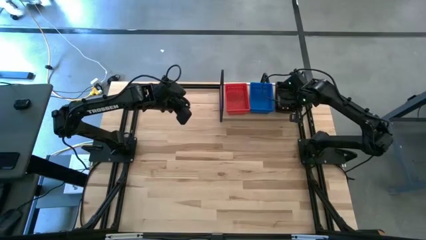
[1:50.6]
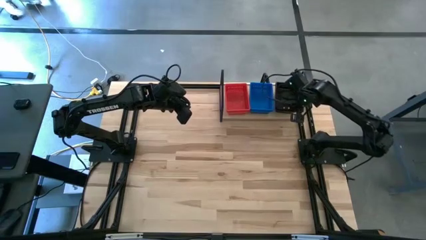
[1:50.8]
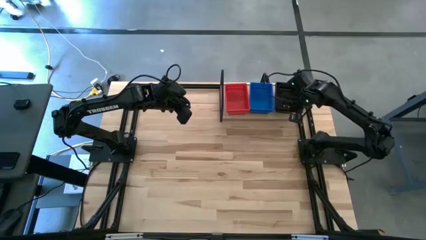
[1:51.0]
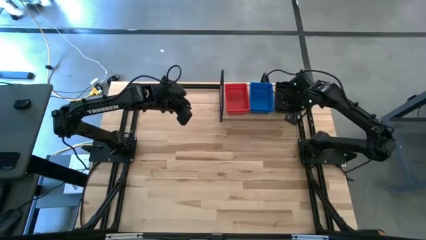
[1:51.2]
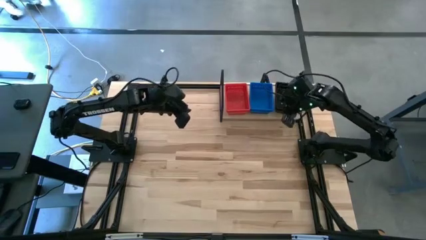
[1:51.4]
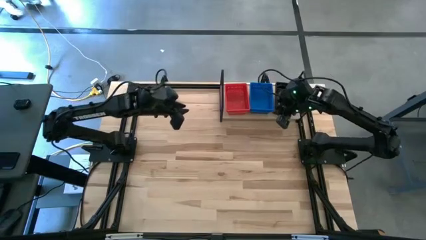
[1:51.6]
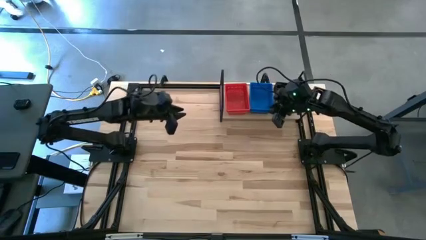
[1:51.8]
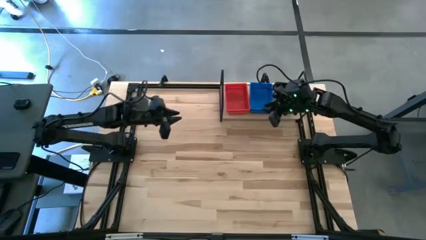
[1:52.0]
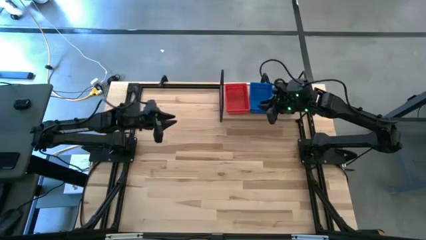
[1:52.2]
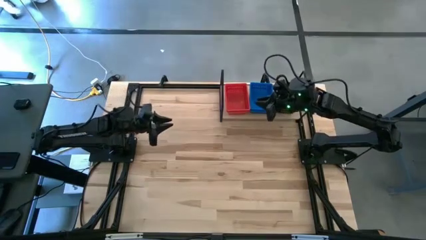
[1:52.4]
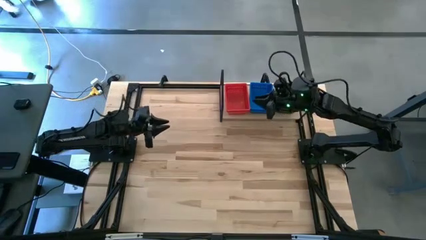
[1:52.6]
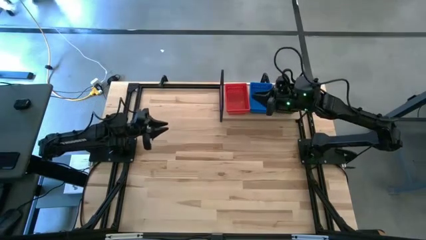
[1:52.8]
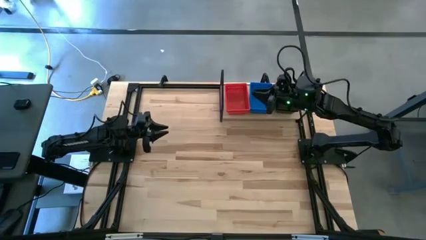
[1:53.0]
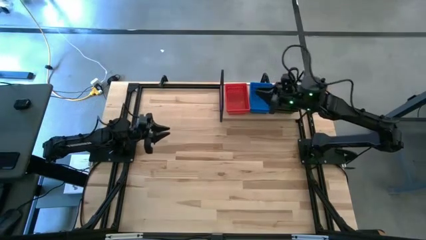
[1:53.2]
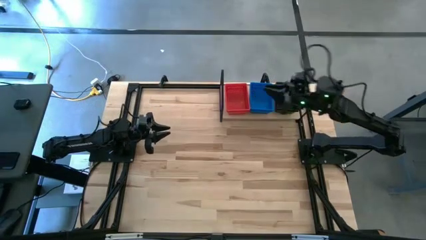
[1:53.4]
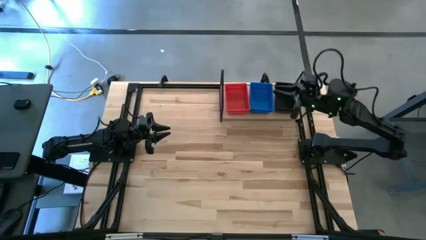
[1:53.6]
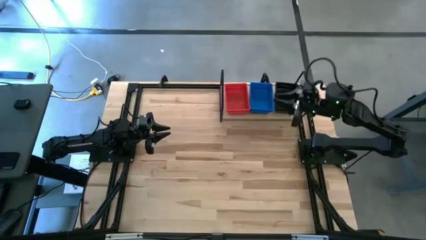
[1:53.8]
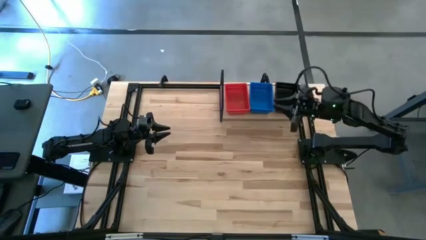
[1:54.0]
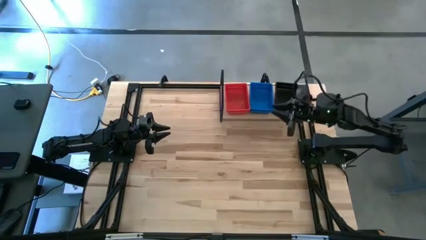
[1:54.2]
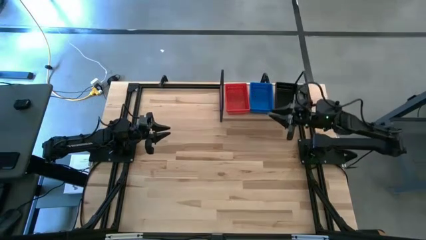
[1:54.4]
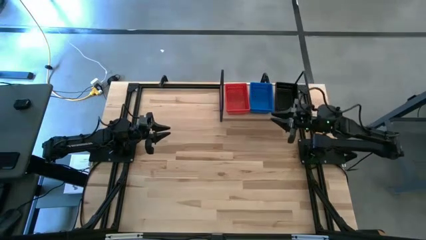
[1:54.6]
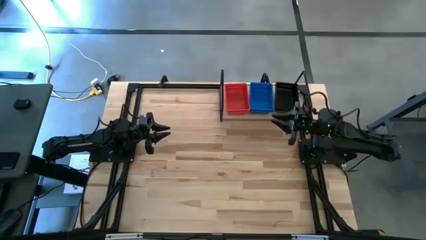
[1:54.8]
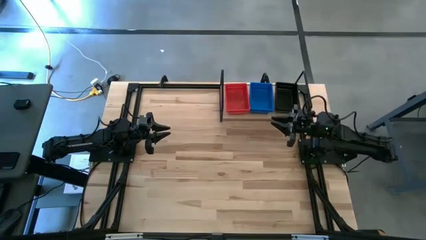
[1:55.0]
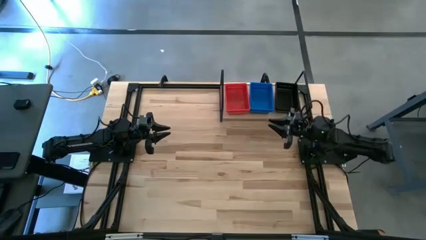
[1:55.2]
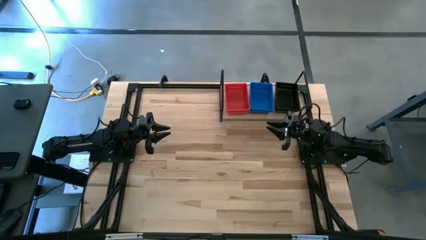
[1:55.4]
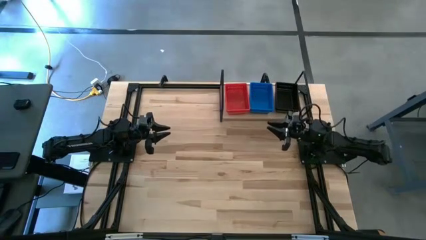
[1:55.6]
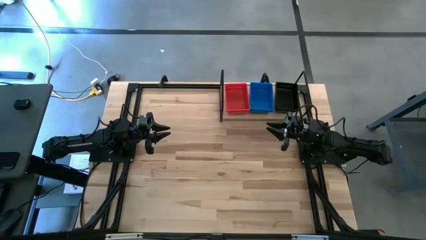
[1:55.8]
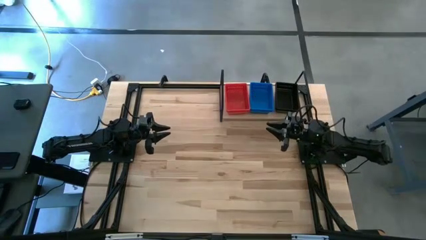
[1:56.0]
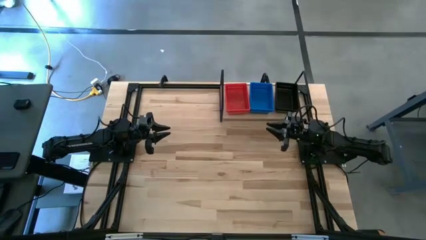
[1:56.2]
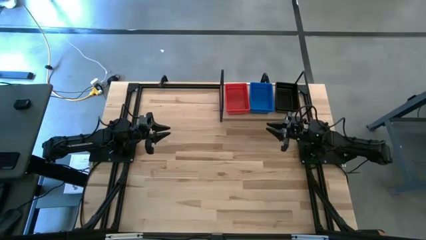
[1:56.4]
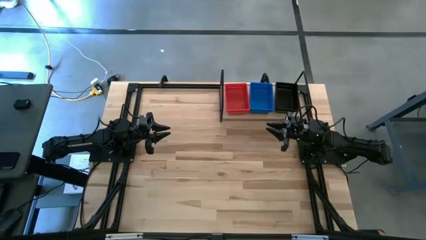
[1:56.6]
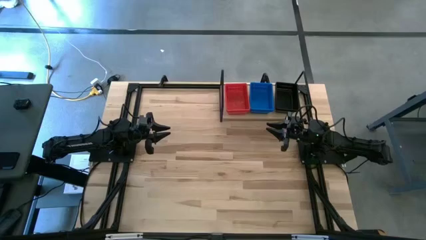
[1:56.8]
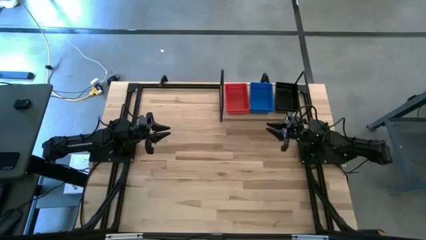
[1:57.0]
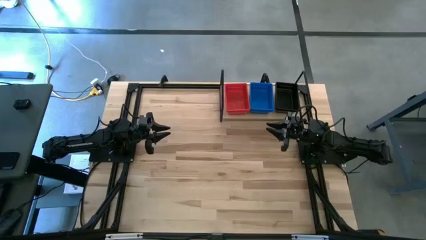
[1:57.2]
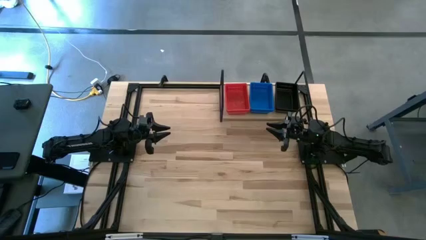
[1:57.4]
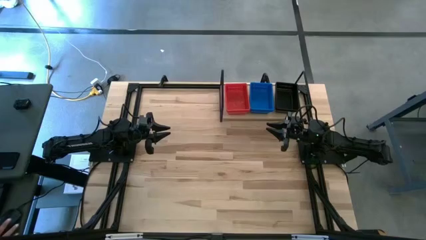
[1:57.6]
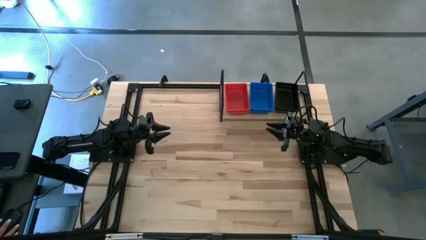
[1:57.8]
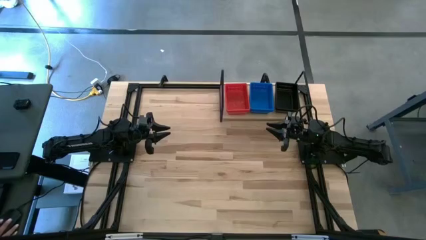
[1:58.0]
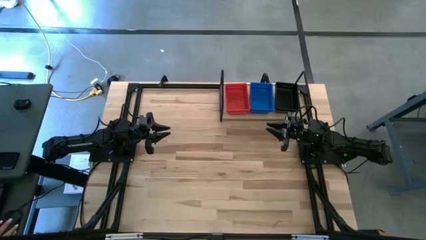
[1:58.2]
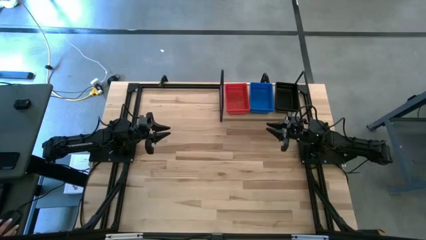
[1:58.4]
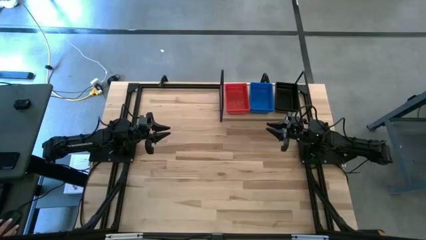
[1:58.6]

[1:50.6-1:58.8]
Task: Stack baskets on shelf by color
Return to home position

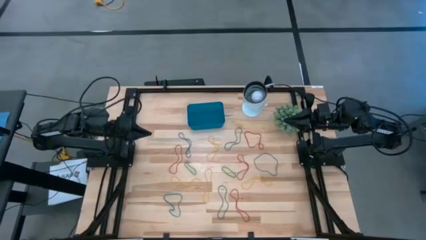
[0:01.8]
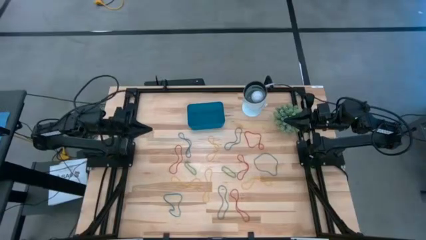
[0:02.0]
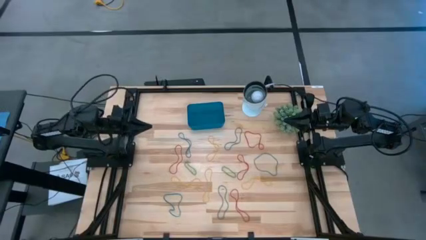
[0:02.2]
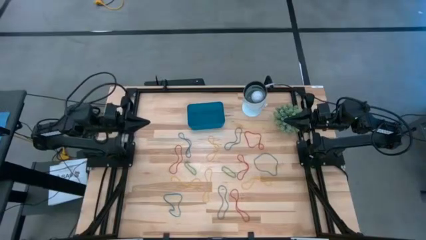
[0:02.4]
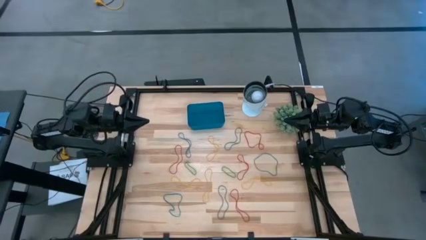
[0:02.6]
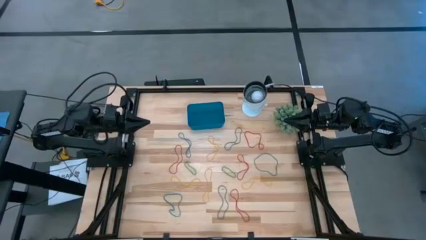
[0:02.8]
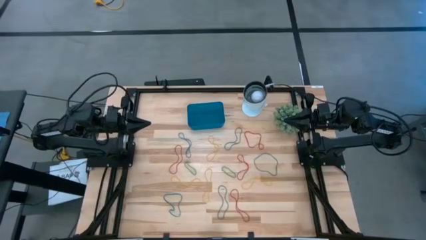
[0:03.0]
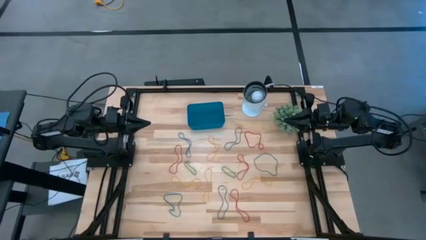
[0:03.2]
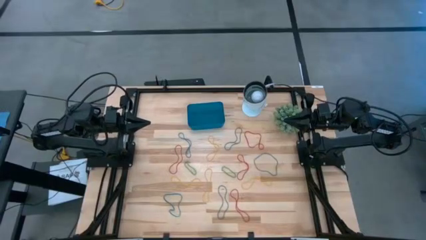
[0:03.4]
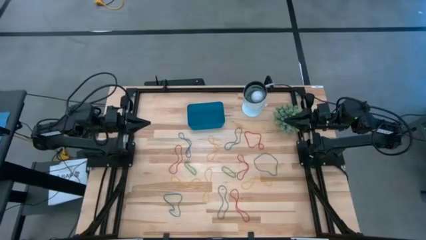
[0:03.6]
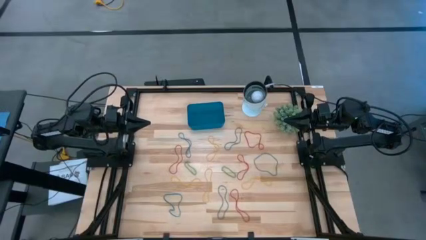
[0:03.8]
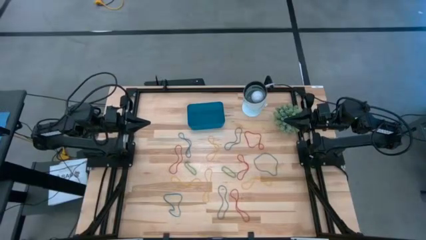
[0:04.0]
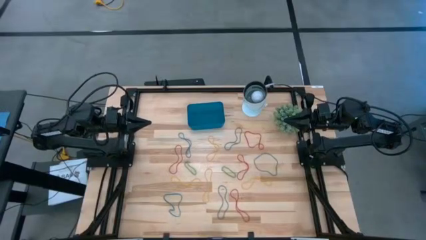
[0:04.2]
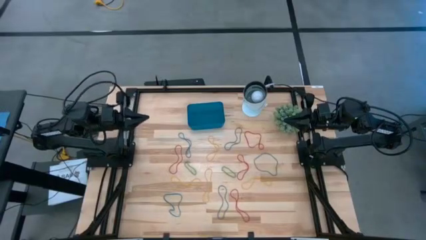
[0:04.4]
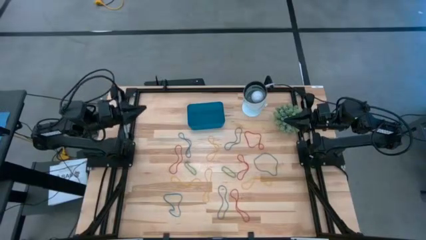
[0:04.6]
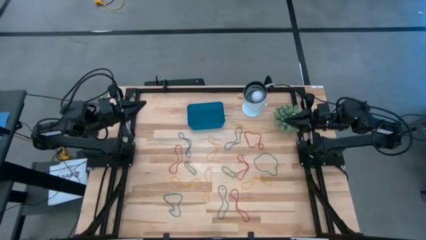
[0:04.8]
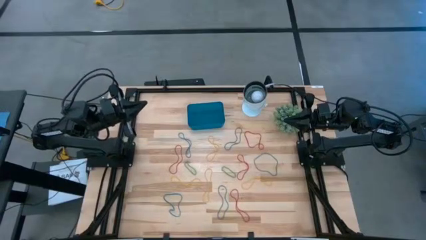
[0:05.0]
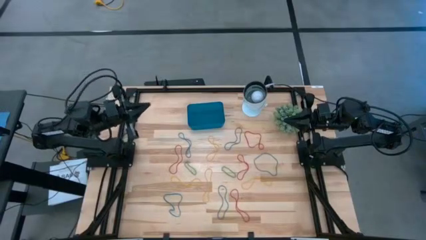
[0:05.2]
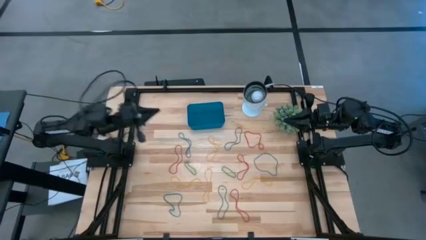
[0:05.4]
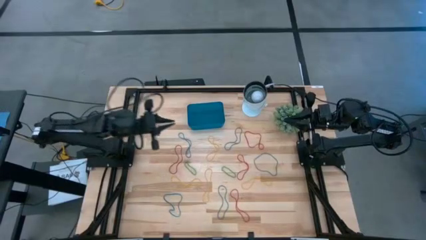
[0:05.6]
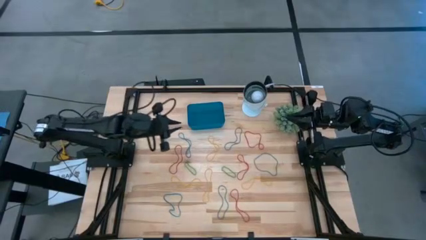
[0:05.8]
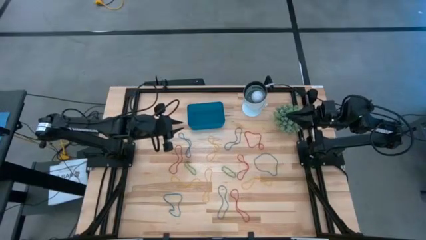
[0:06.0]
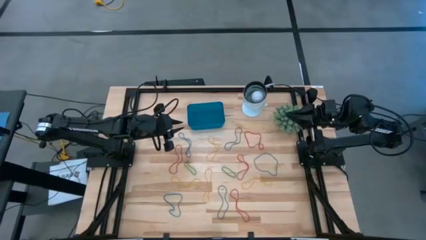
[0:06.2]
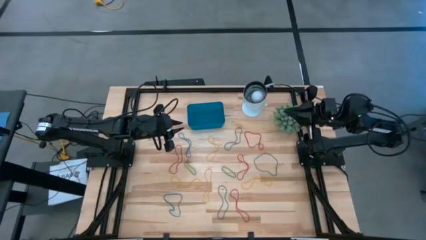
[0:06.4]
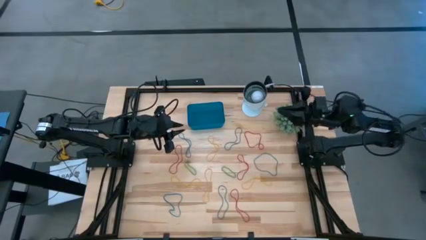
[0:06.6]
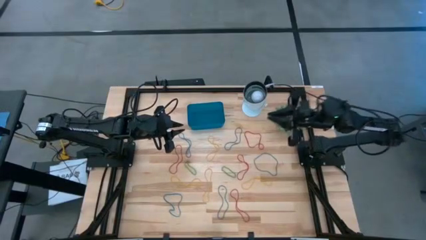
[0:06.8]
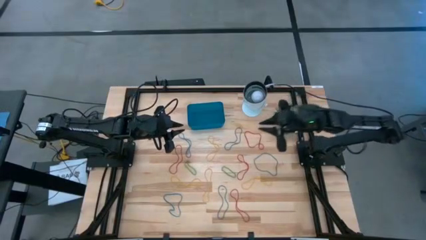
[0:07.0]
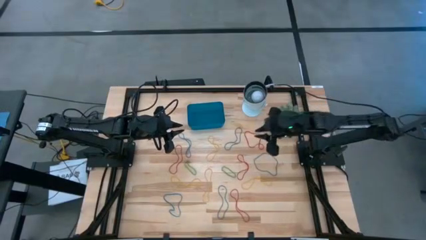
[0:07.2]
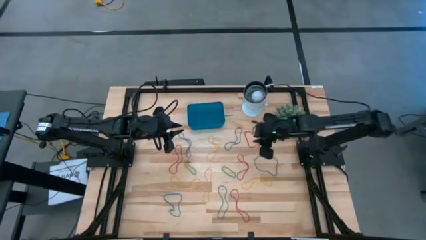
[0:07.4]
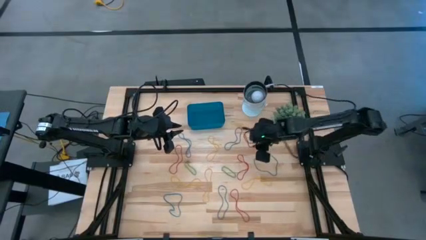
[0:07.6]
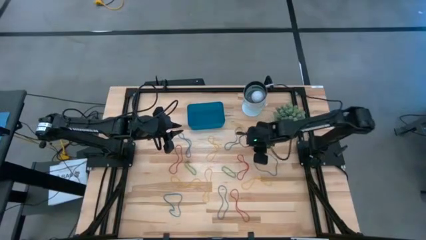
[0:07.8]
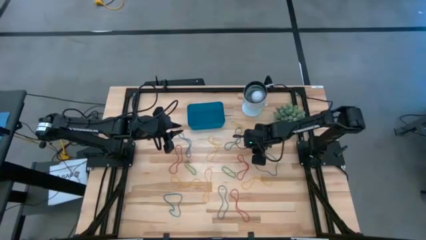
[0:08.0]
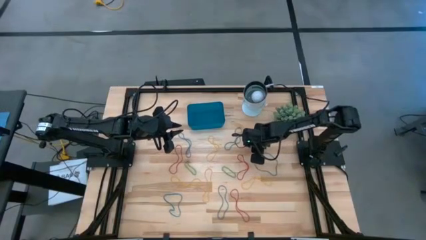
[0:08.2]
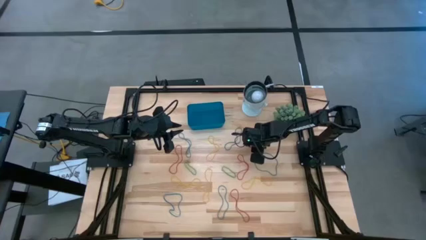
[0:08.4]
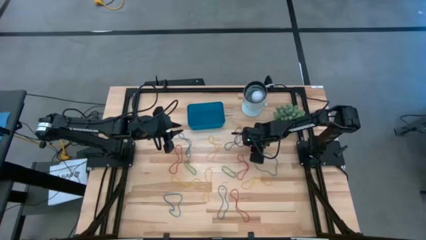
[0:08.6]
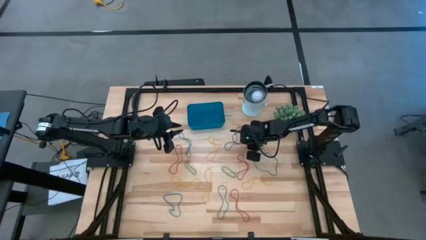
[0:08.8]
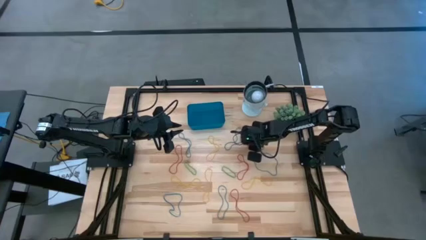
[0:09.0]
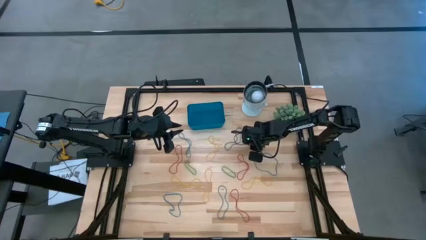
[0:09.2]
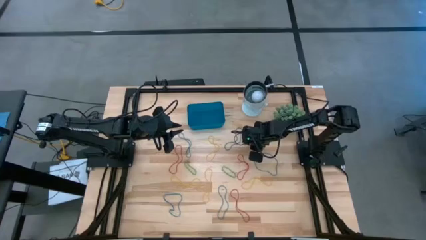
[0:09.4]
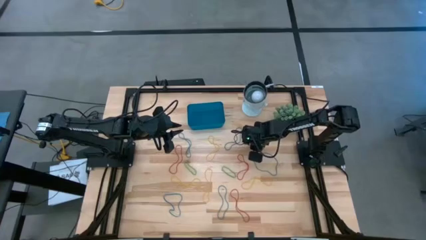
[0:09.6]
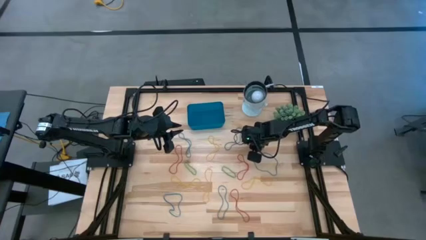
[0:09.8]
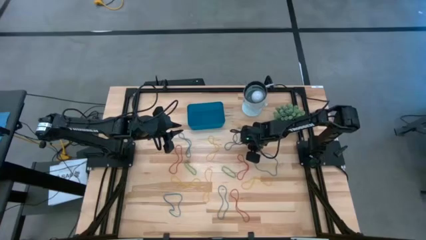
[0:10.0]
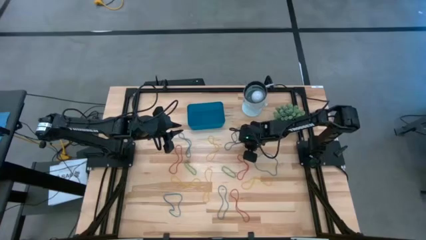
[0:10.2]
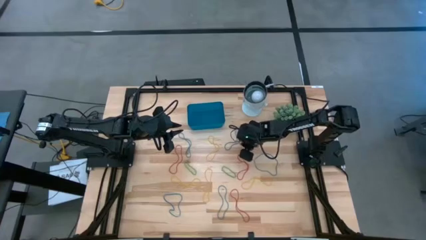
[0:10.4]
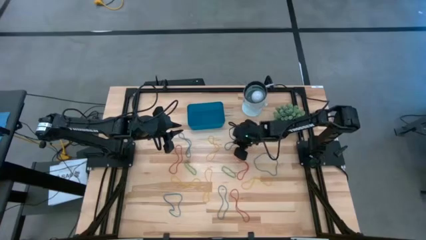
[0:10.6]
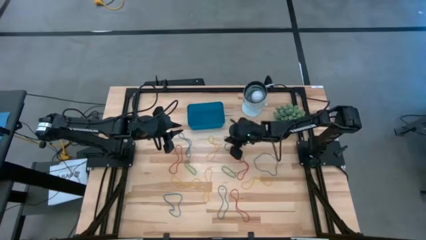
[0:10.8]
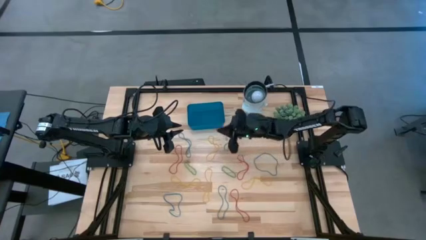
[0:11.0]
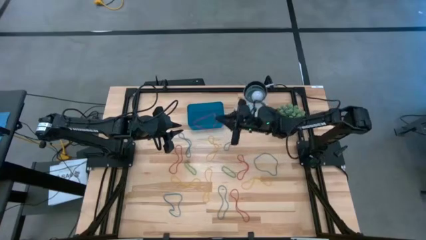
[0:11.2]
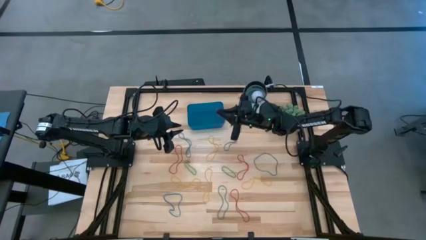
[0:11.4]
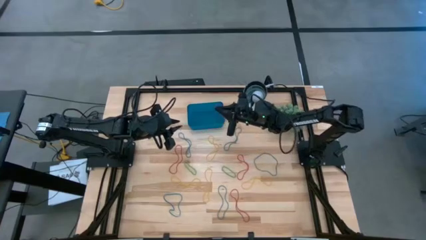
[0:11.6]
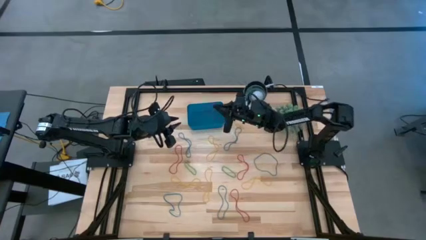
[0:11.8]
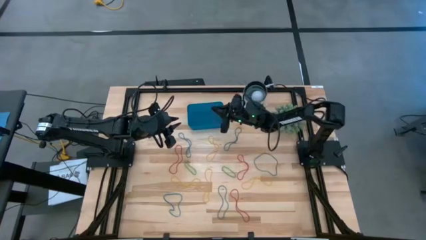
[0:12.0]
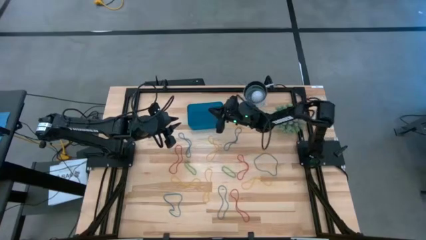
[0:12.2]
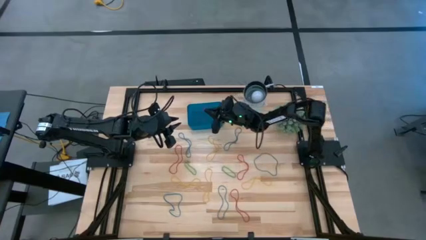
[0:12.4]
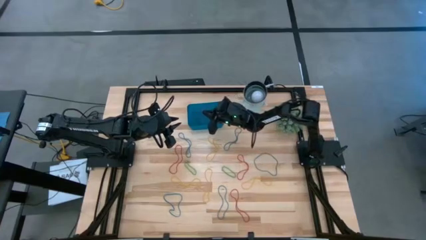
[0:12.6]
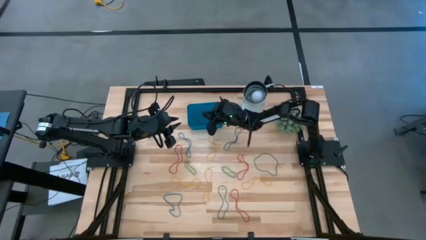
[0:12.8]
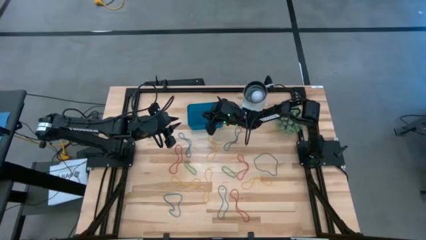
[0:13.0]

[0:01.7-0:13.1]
Task: Pick and place items into bin
Put the red rubber band into the blue bin
